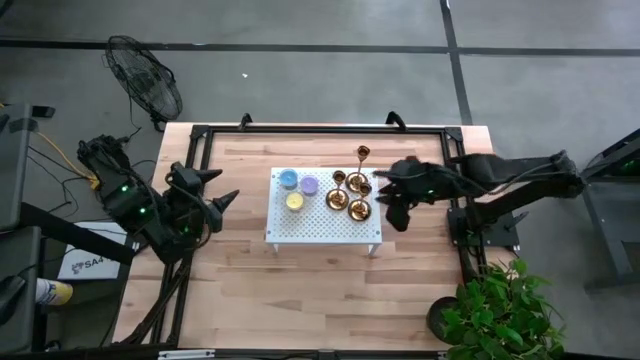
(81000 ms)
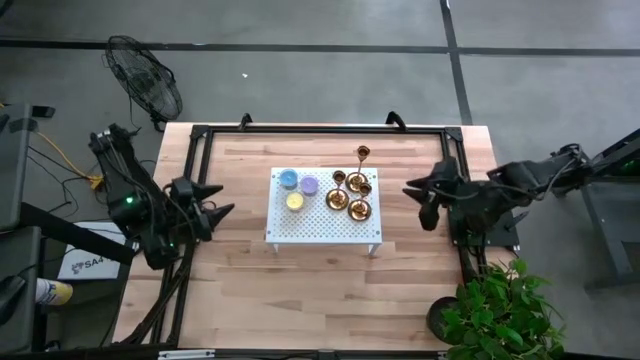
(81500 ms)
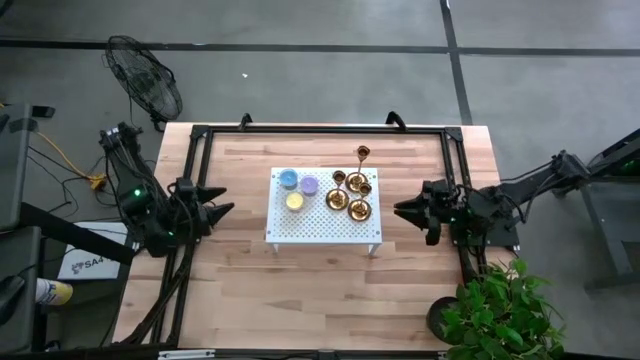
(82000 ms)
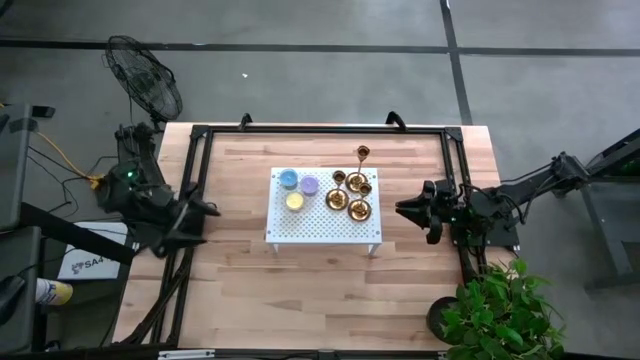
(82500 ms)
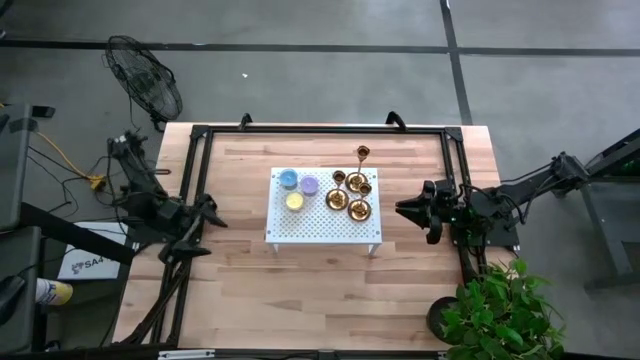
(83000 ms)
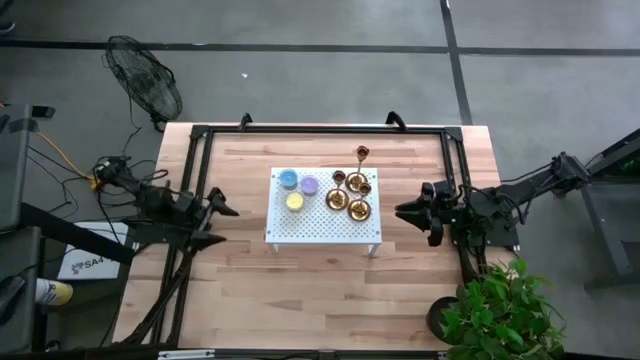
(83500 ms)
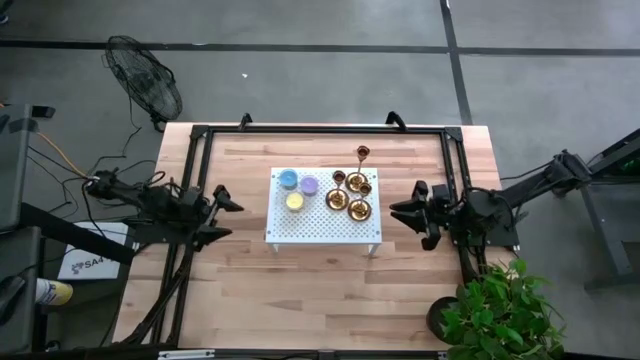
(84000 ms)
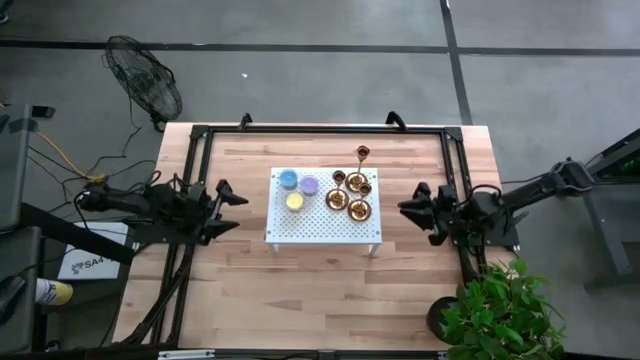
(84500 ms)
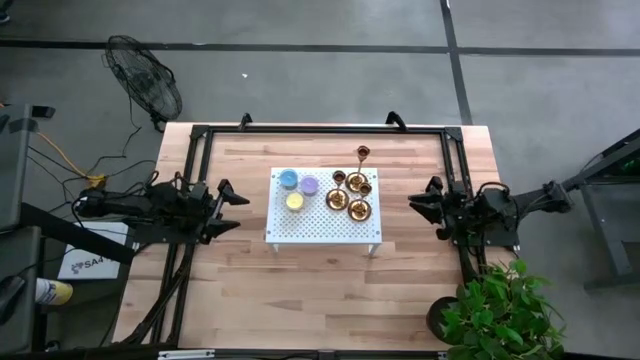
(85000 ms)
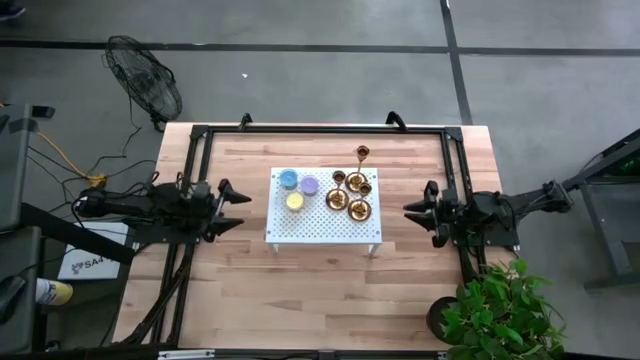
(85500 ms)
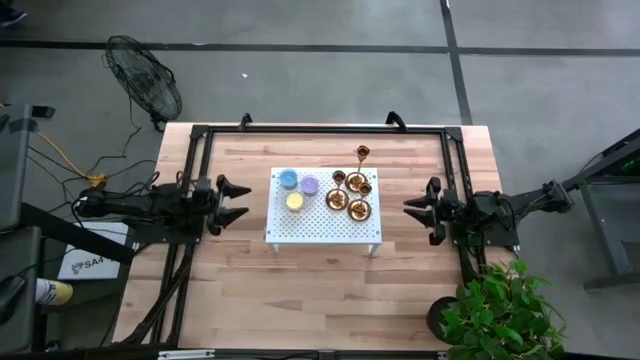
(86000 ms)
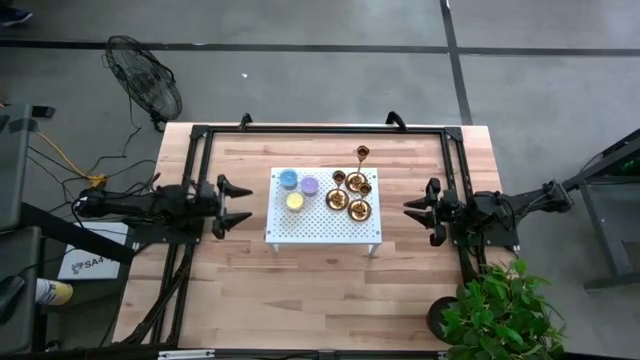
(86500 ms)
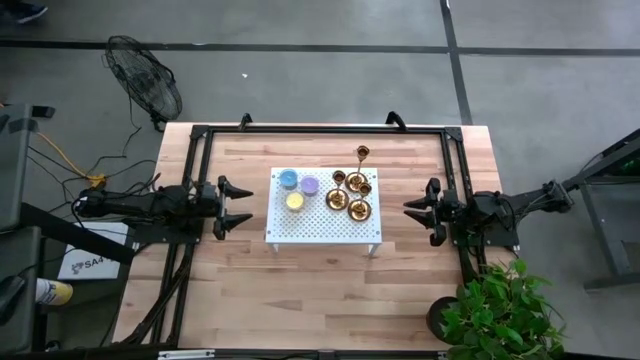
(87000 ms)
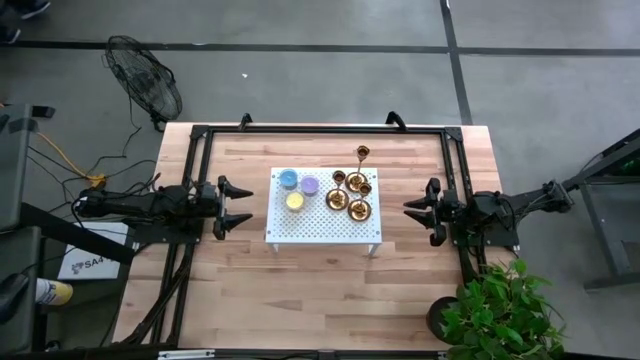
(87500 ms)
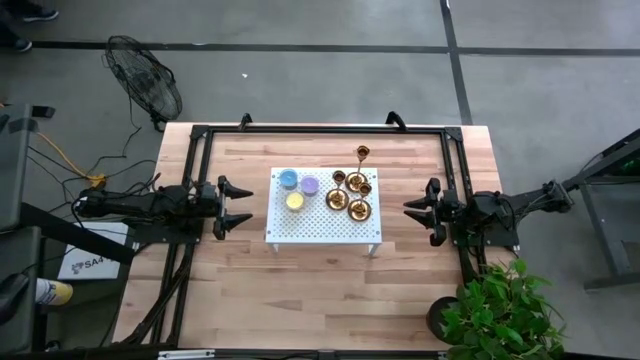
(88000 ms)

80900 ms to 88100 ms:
Task: Pick & Place candle stick holders
Return to Home Position

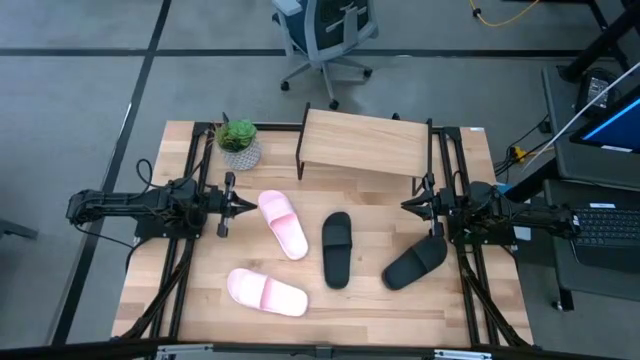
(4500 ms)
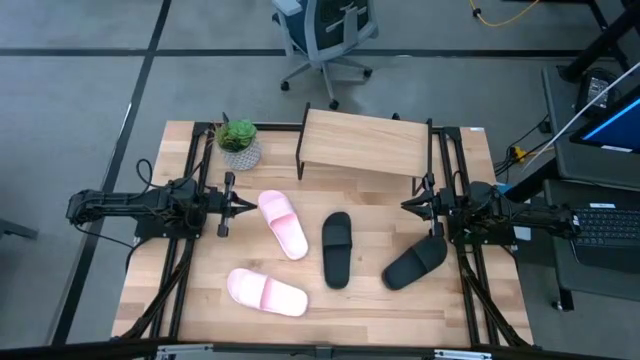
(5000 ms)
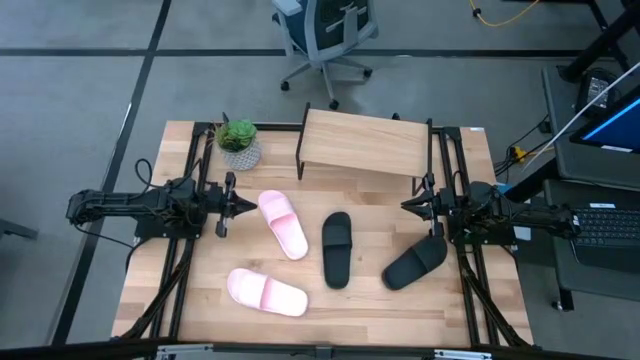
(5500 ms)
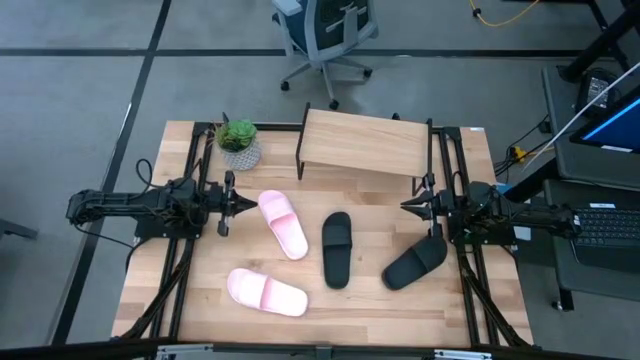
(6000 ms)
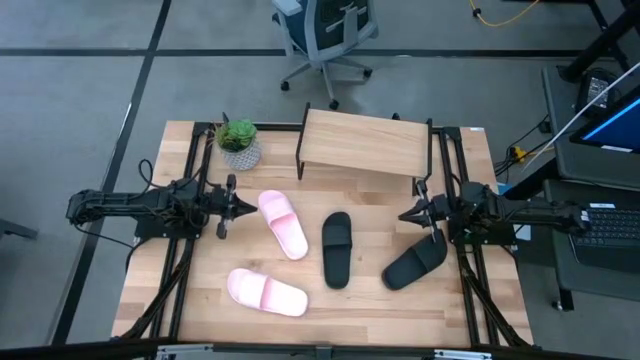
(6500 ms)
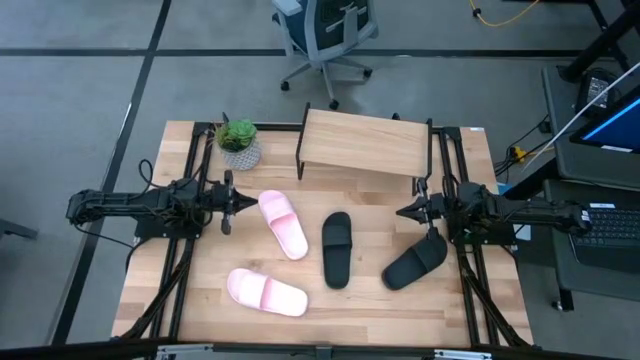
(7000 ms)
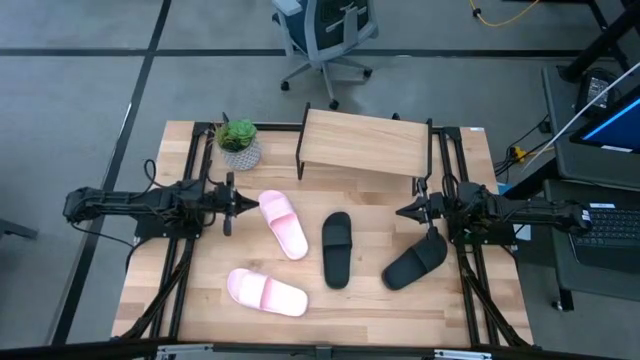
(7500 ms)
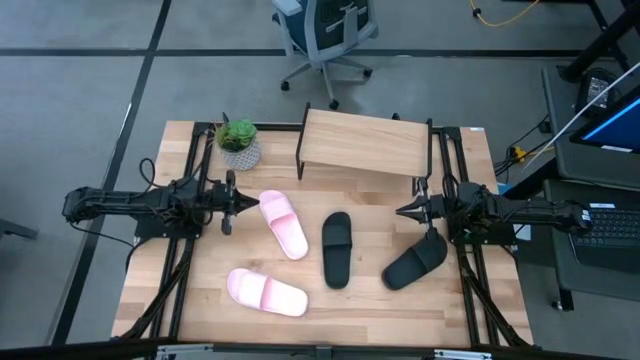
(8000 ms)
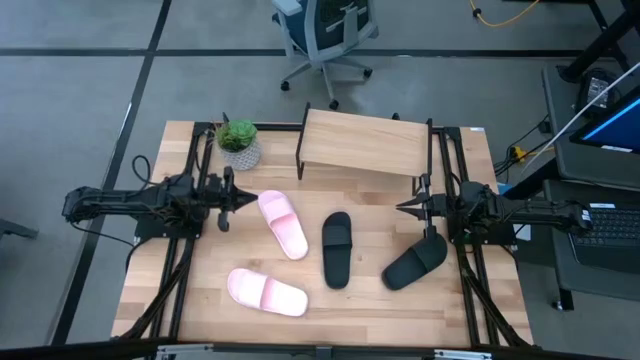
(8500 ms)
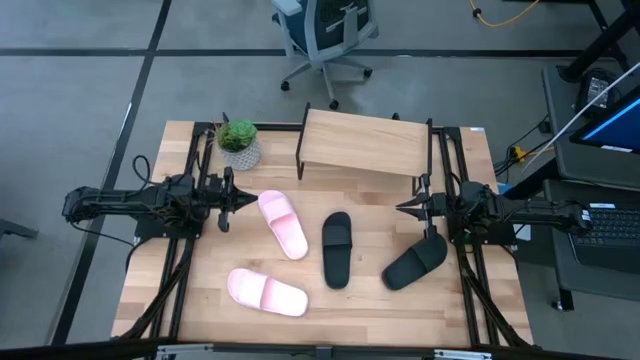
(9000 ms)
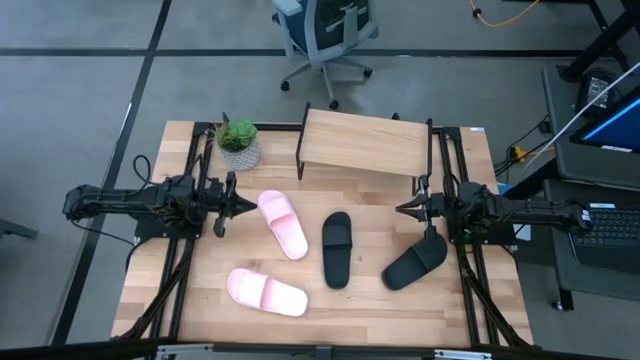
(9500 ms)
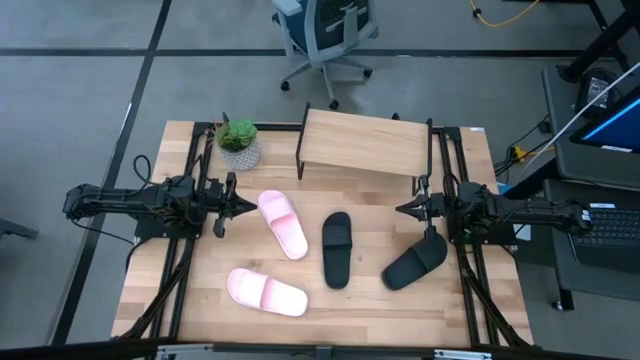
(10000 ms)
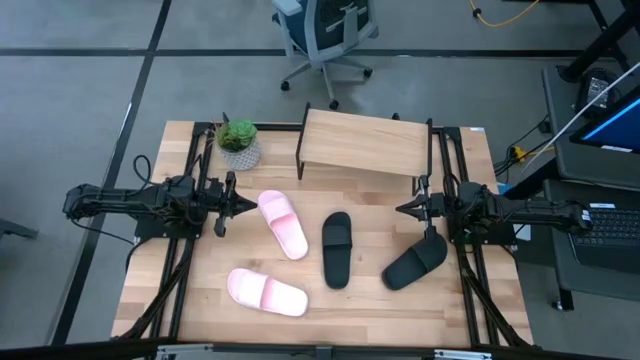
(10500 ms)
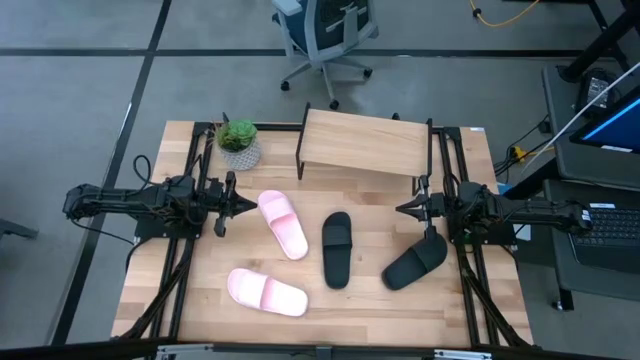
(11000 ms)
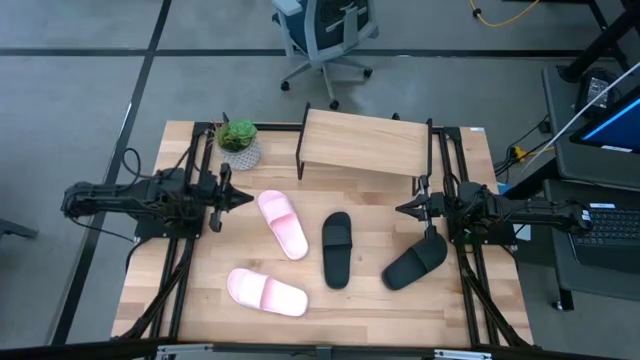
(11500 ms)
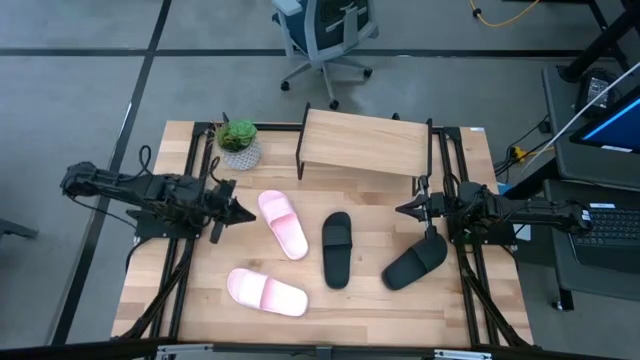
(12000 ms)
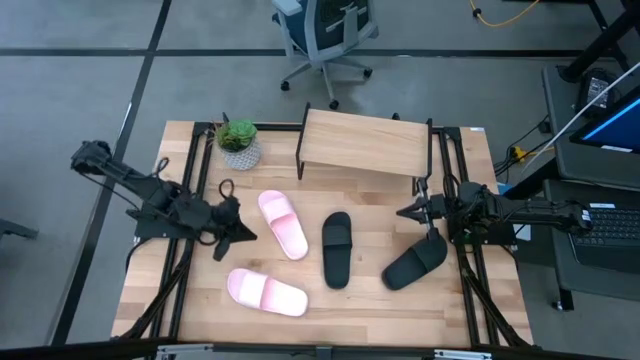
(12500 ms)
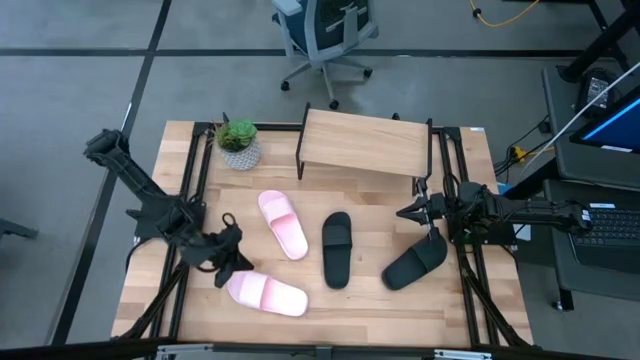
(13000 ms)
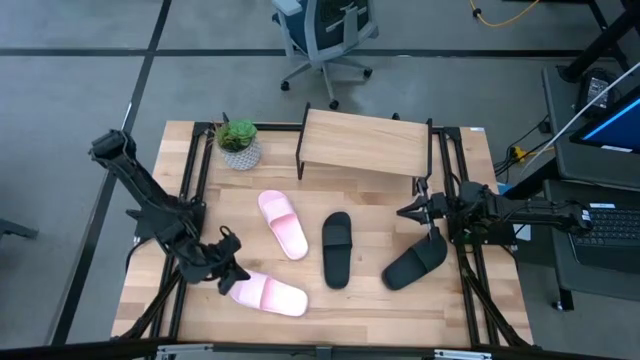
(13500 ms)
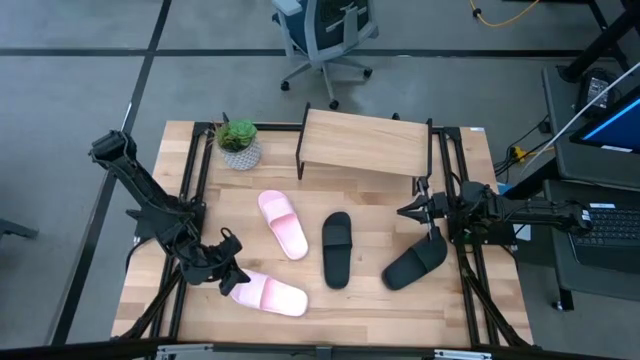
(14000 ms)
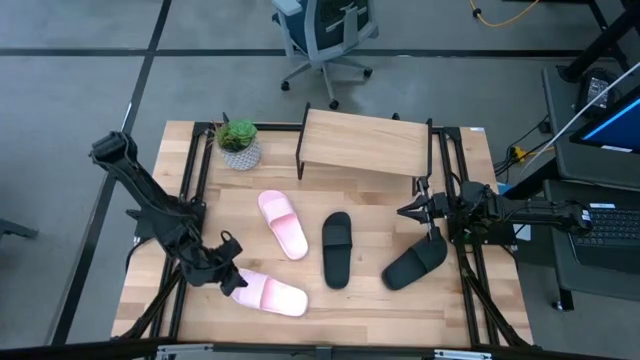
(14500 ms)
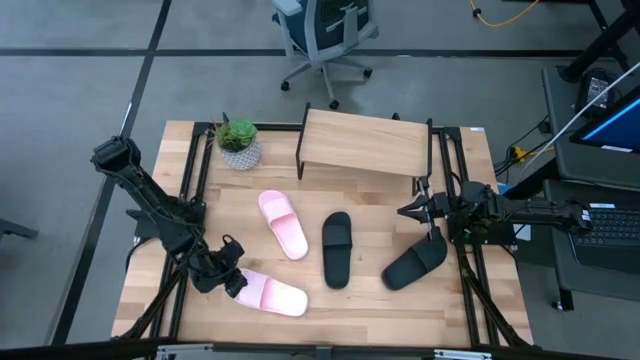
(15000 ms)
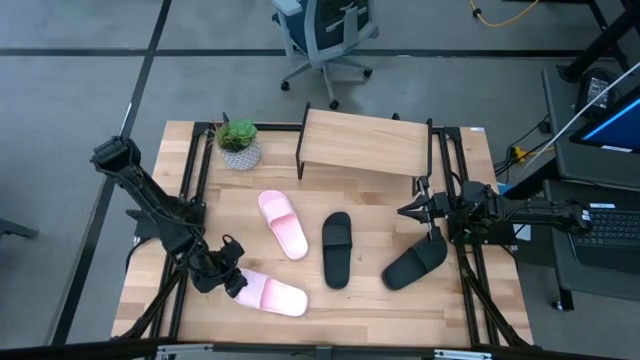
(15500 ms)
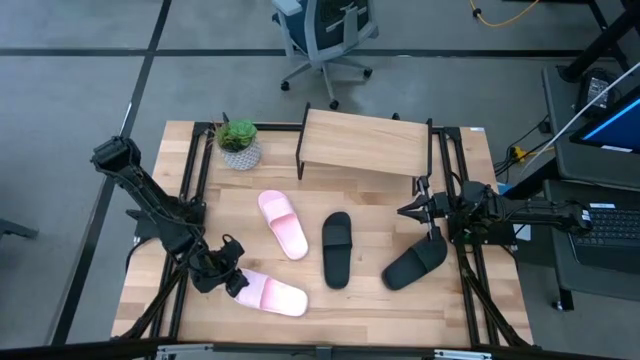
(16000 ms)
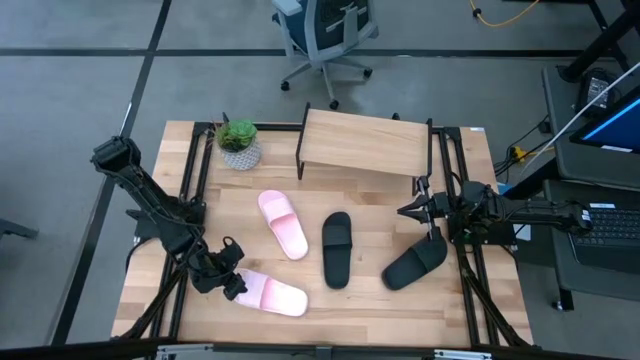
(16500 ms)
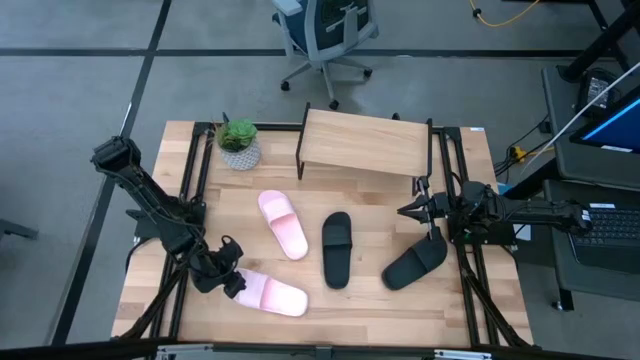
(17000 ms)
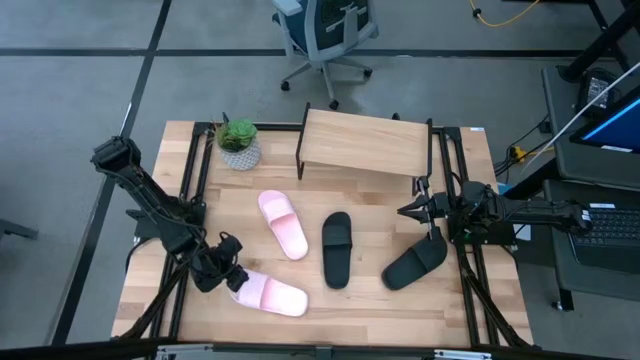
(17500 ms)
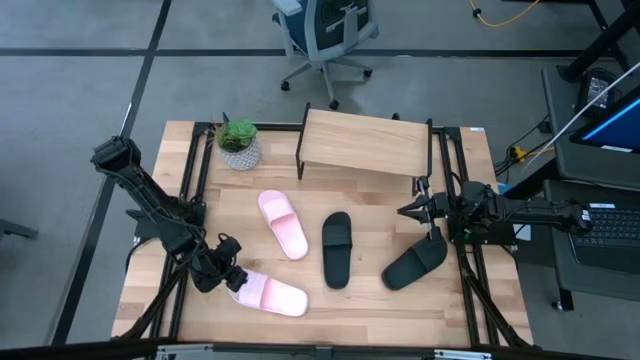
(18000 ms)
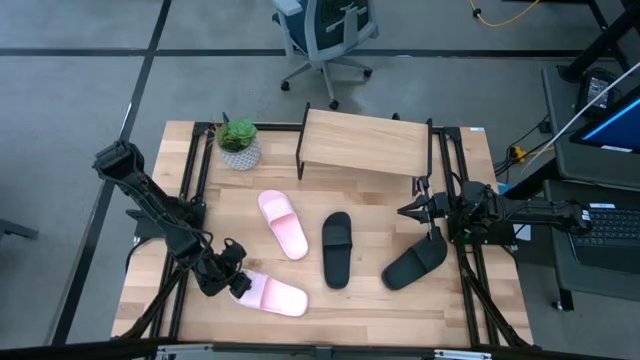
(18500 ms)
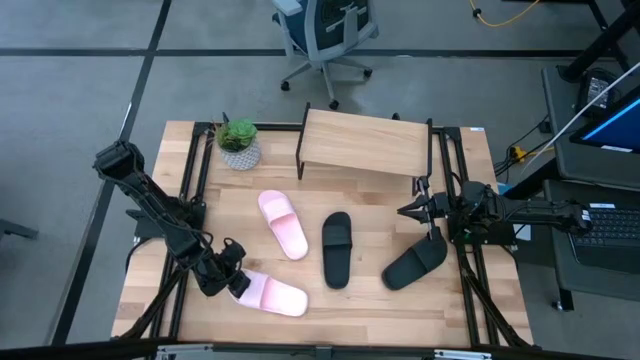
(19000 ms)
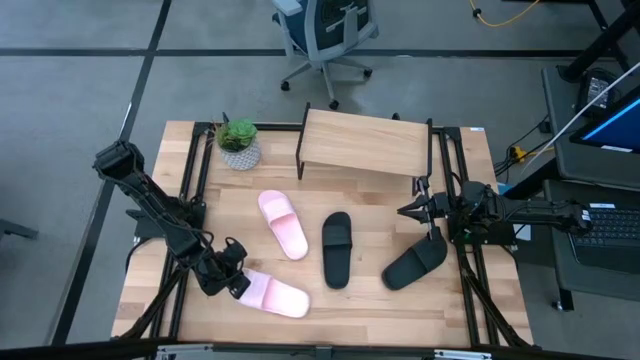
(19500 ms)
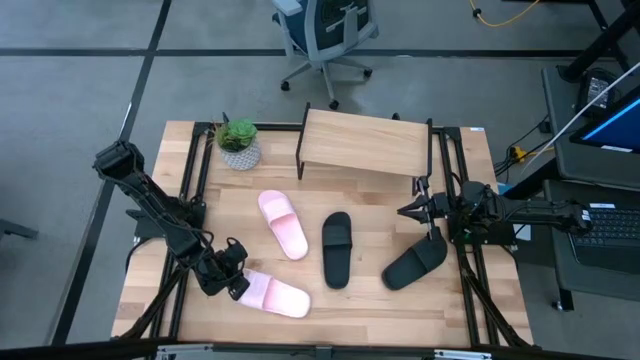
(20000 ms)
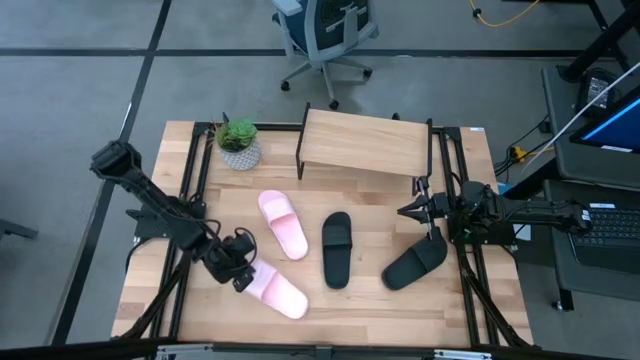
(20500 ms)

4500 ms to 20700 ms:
Task: Pick and place slides into the shelf
Put the bottom pink slide on the shelf
